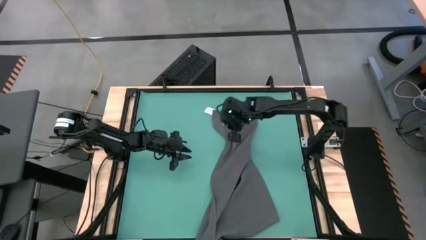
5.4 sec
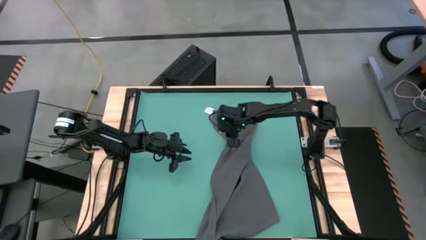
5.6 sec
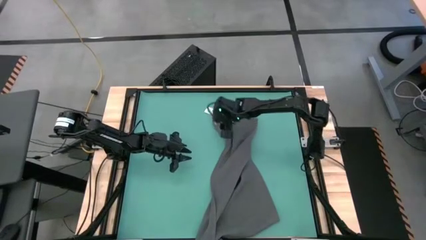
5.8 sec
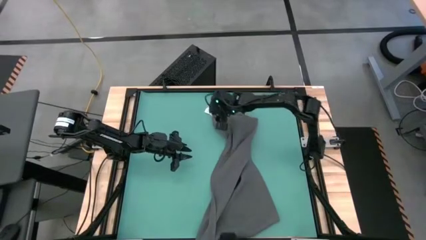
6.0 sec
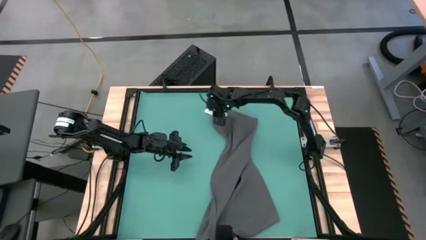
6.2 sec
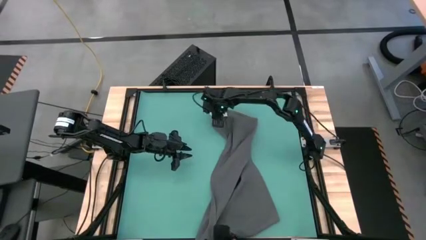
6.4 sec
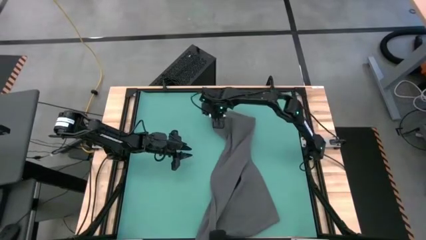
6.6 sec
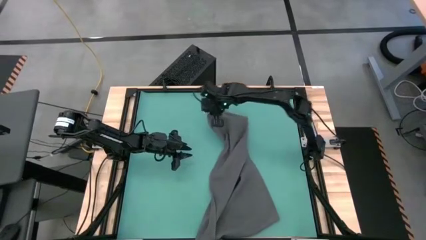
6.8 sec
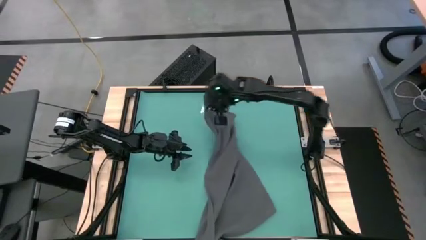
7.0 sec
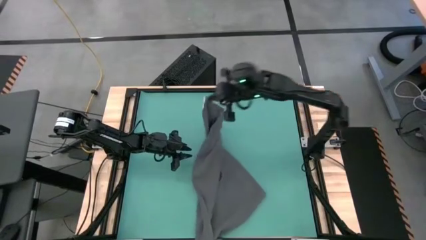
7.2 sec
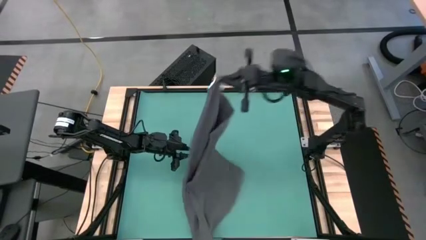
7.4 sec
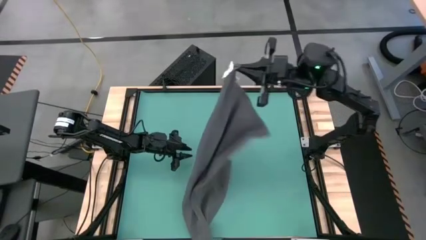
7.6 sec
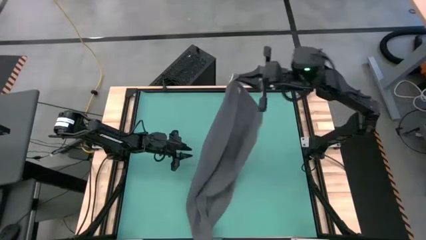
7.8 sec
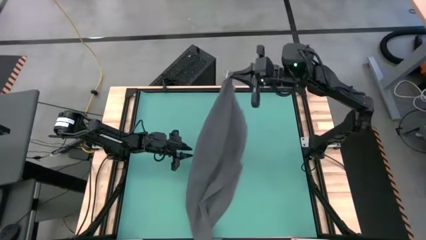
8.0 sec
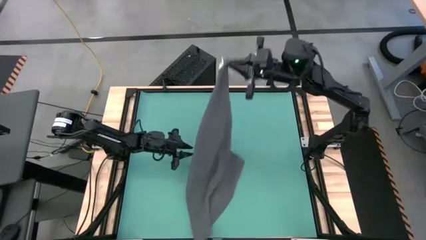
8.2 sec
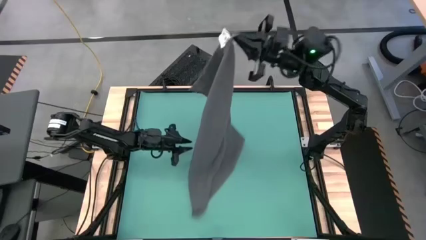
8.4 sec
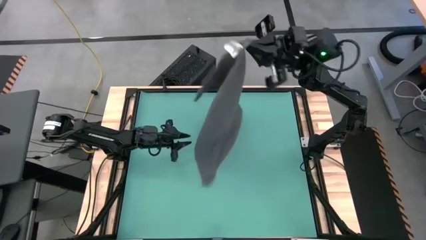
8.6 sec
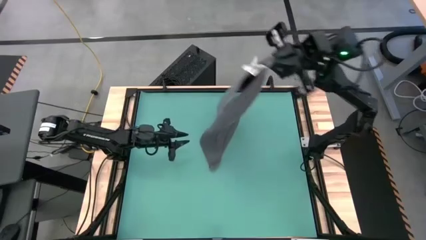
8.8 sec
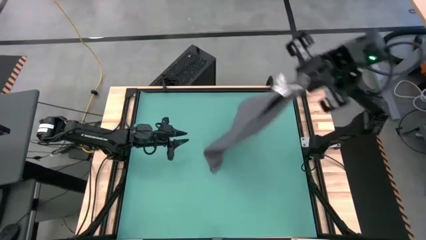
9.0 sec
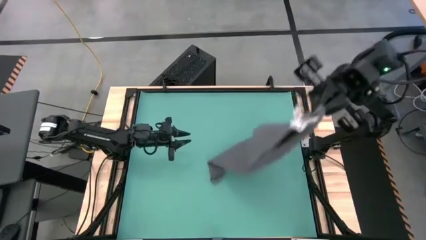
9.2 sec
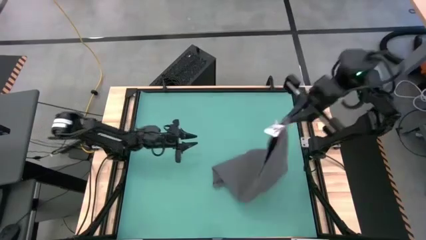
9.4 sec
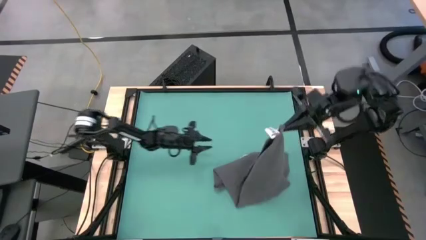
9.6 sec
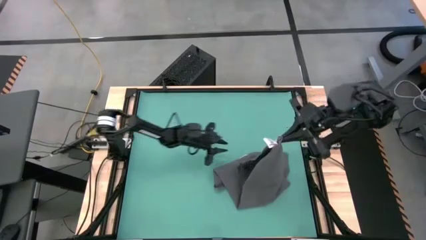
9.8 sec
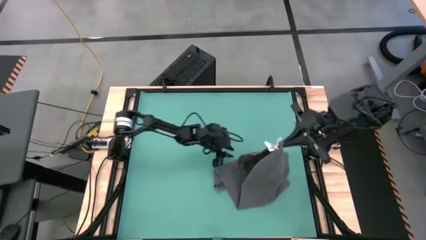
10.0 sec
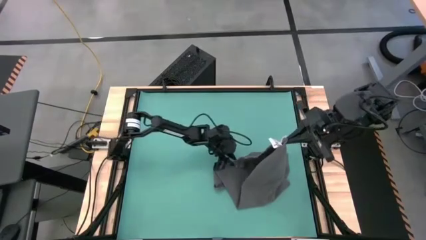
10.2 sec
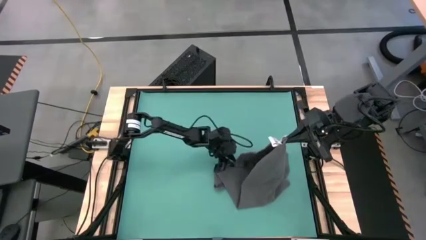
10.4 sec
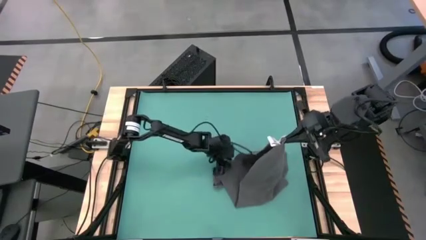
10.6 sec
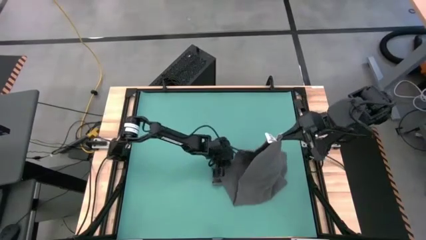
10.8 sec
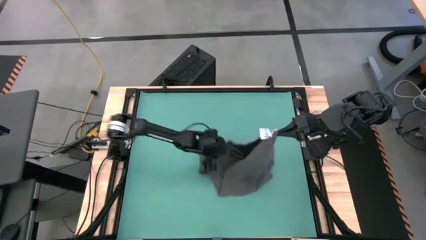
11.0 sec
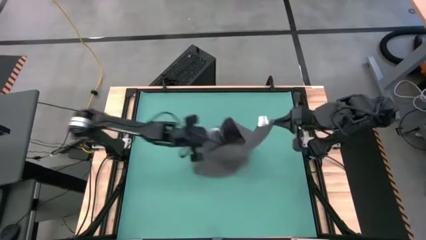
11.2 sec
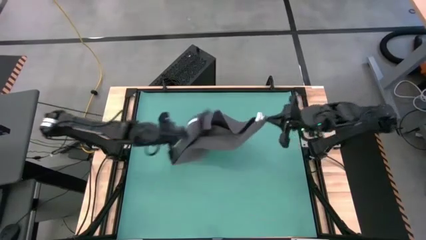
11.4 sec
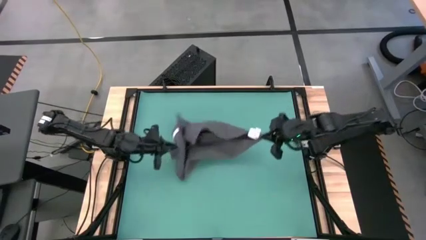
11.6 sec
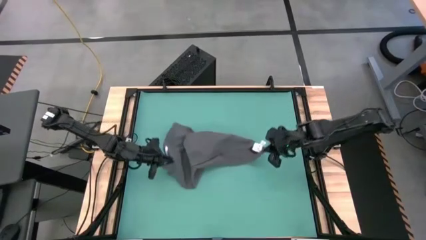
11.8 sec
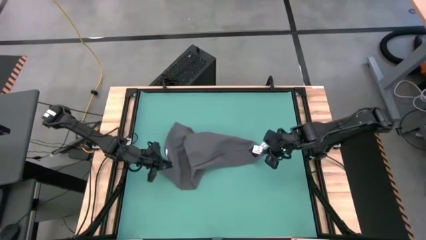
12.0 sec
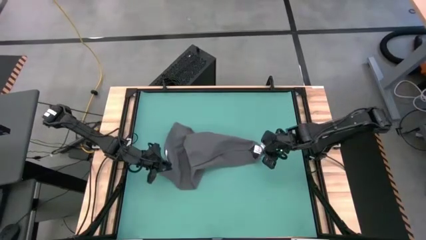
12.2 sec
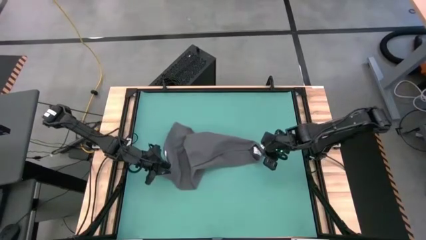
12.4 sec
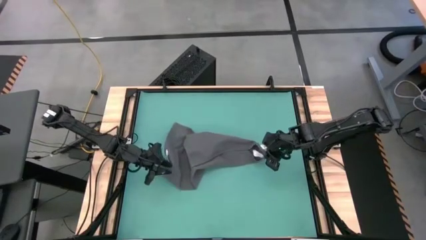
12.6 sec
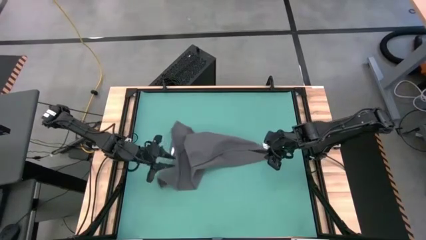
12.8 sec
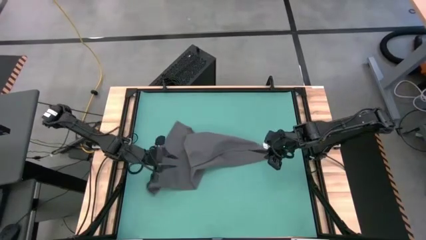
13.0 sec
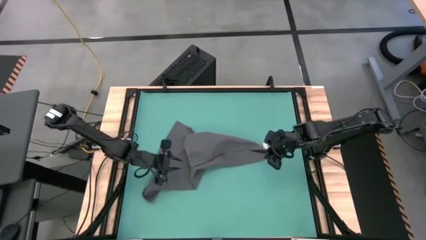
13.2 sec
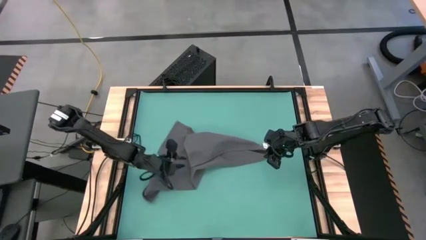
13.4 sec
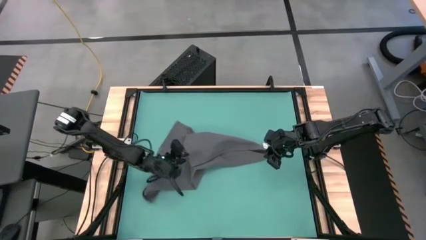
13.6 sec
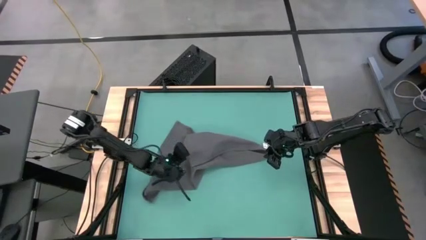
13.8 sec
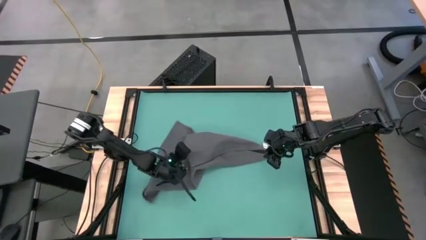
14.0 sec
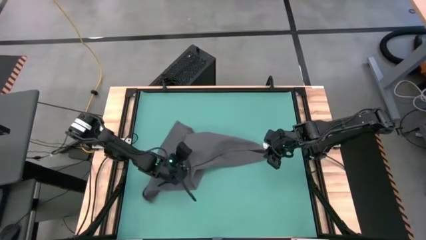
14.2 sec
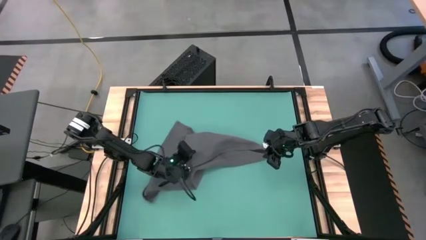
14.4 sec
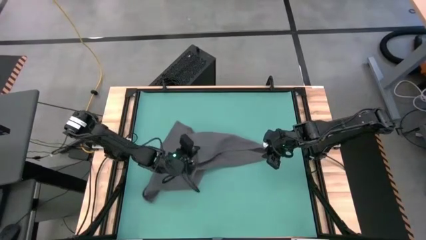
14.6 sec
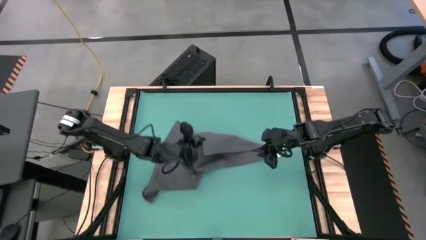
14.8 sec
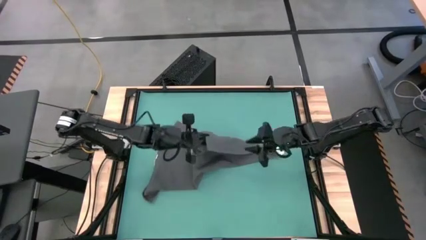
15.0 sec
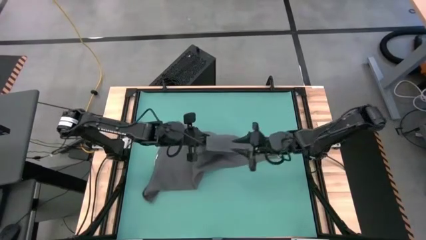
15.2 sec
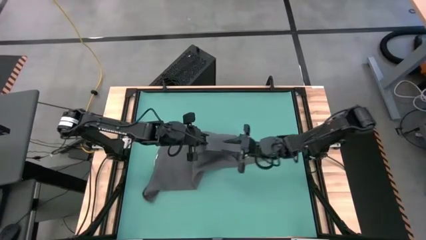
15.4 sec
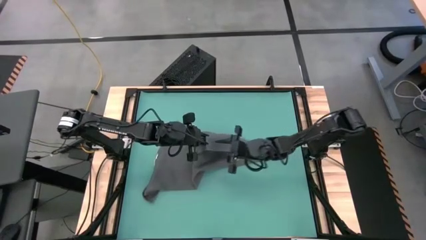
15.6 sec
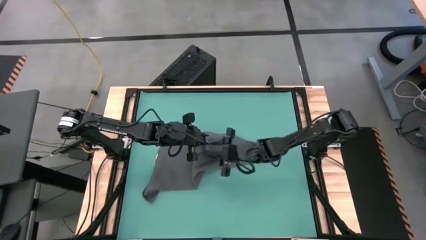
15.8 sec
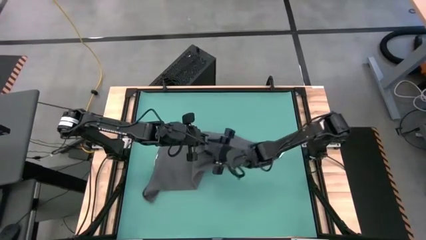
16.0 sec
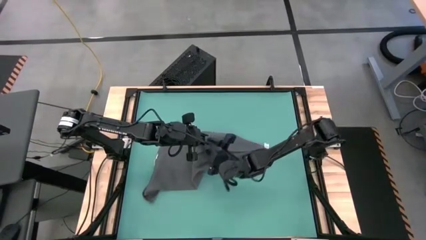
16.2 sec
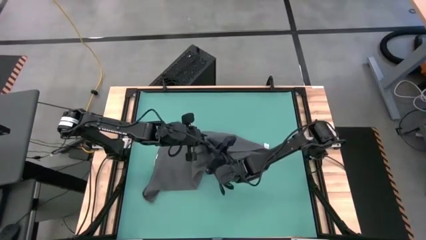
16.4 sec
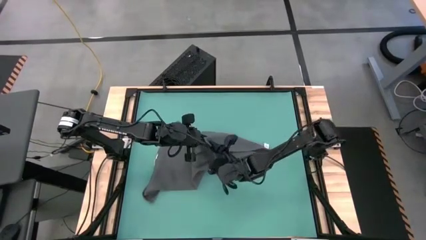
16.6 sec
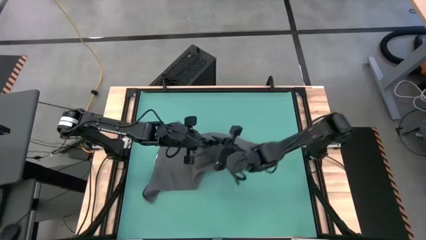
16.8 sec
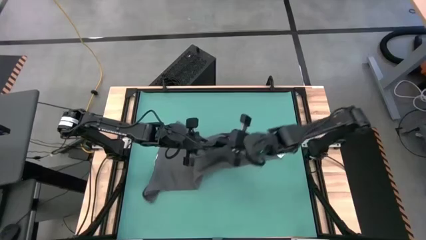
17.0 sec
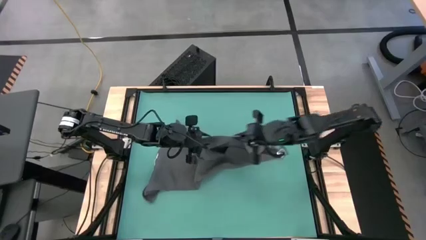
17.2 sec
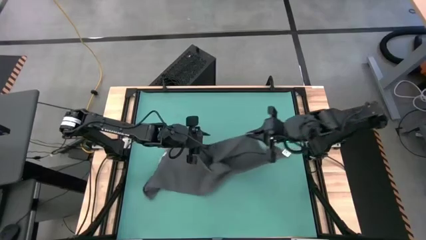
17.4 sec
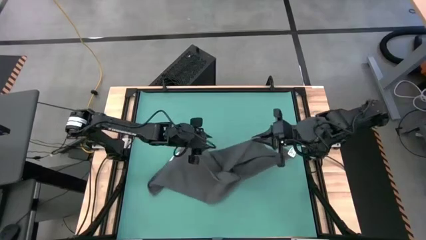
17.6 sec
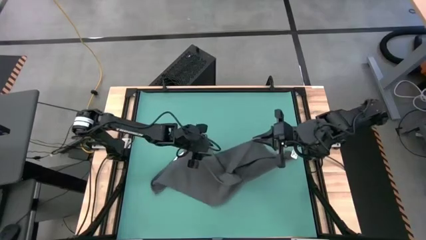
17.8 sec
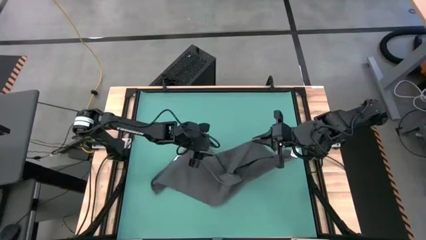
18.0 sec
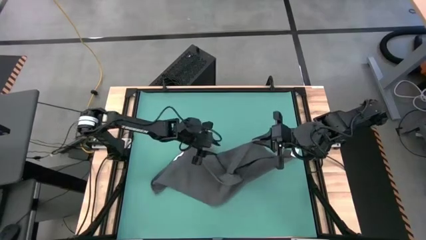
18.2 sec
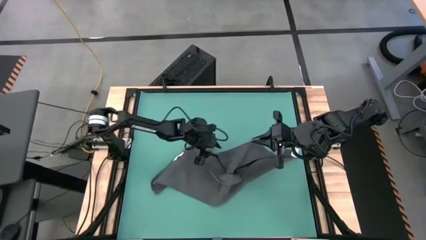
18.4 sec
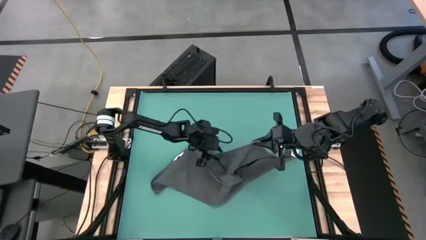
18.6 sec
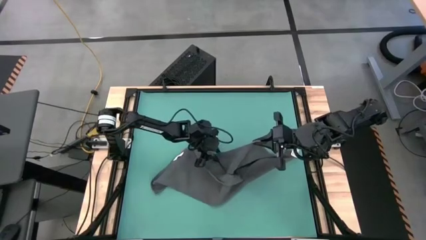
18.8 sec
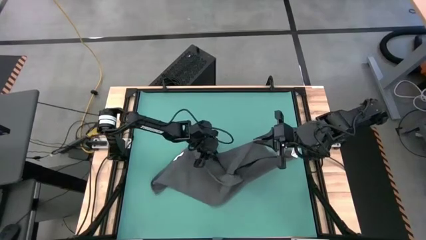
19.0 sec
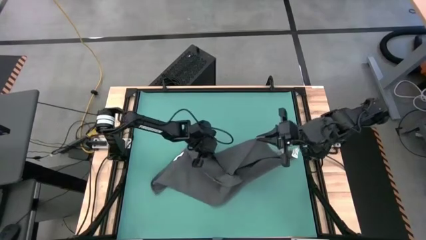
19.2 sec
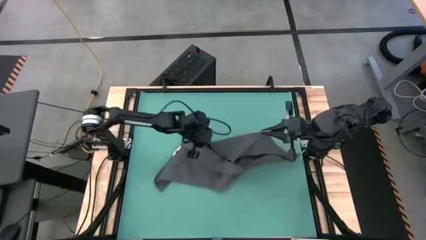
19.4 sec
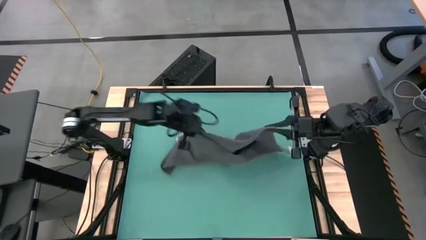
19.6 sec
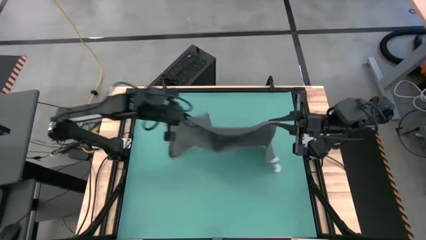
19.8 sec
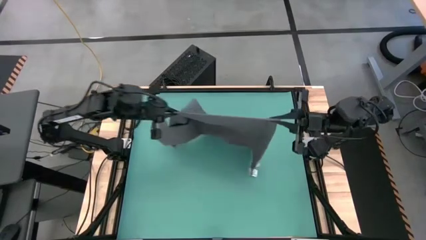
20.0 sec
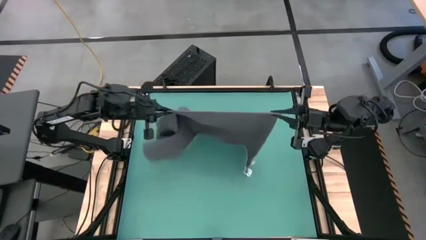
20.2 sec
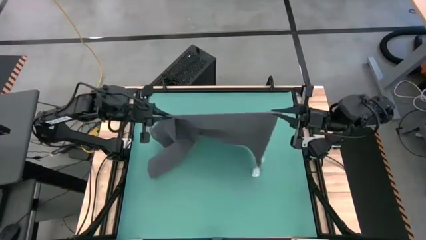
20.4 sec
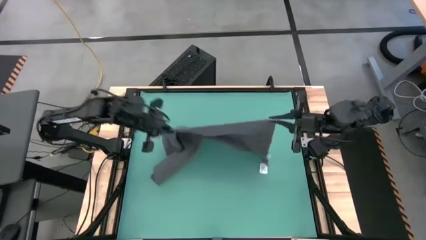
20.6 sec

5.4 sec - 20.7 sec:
Task: Roll towel into tight, uniform cylinder
Fold the gray towel
